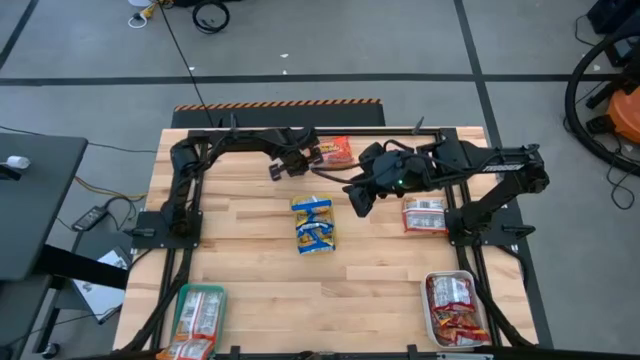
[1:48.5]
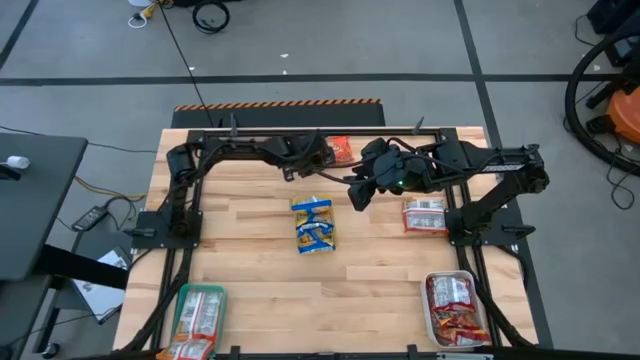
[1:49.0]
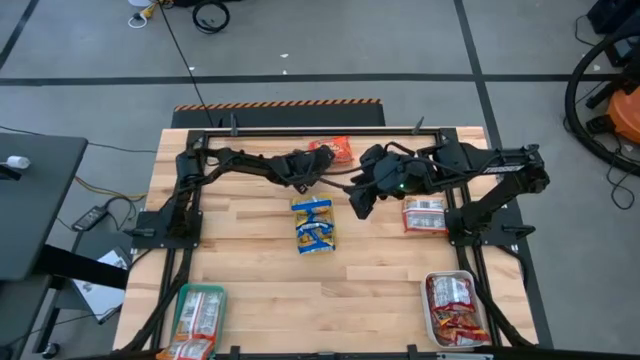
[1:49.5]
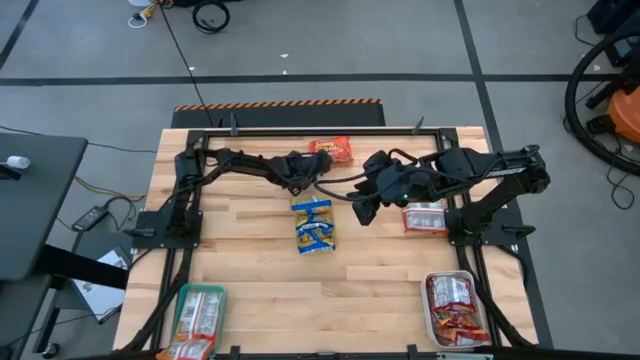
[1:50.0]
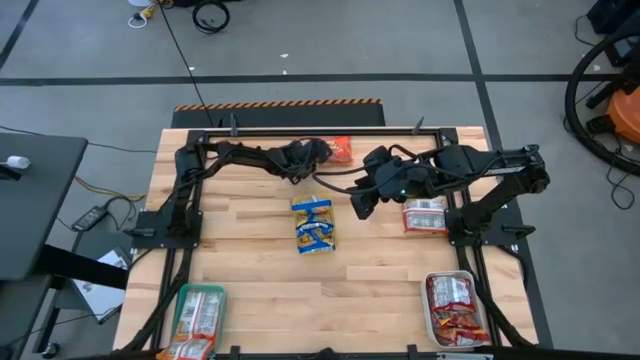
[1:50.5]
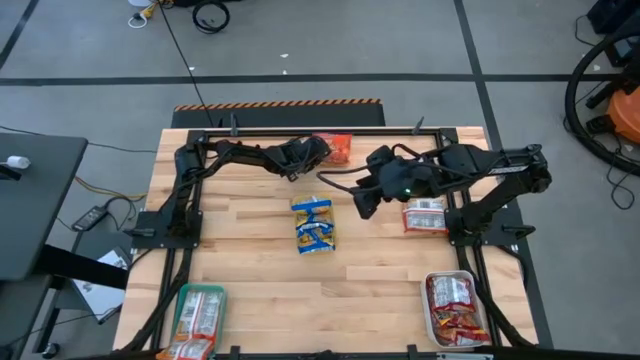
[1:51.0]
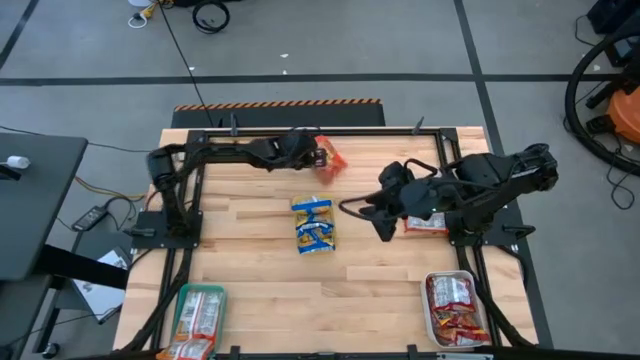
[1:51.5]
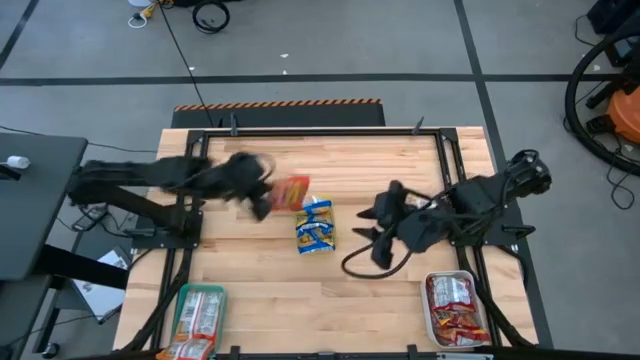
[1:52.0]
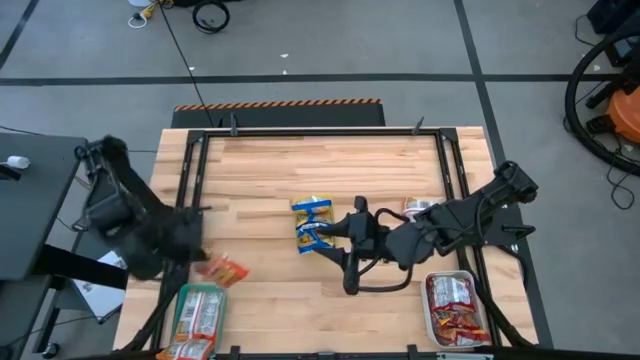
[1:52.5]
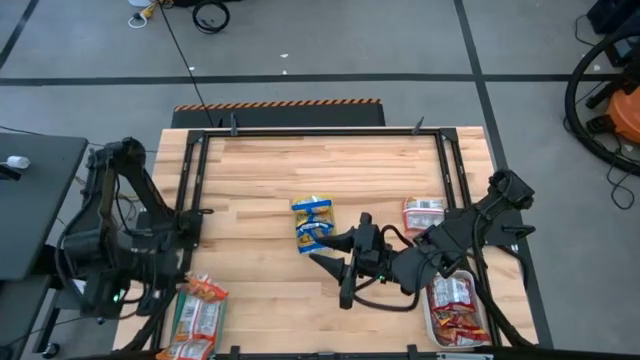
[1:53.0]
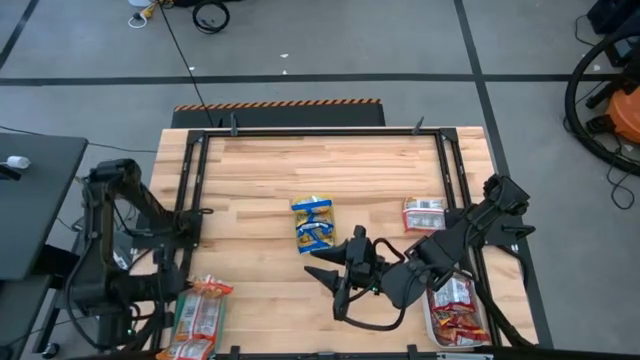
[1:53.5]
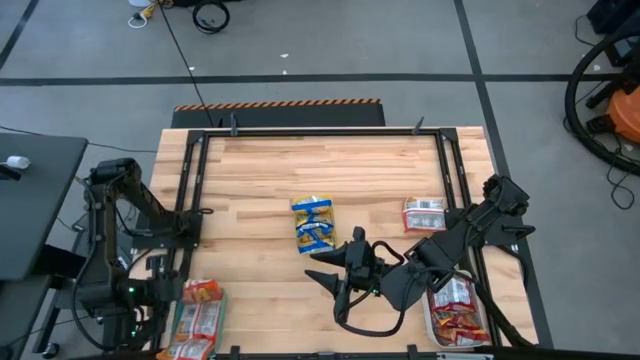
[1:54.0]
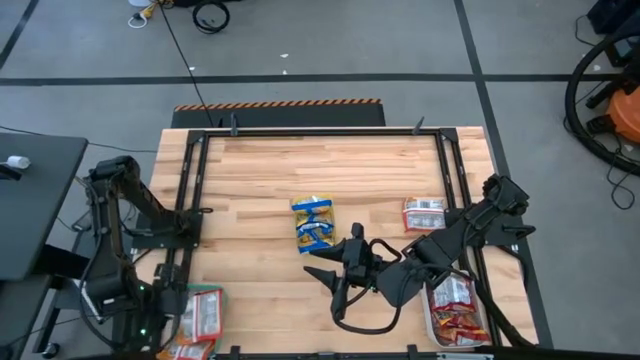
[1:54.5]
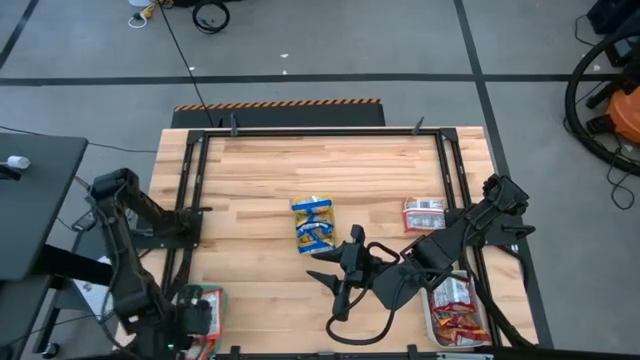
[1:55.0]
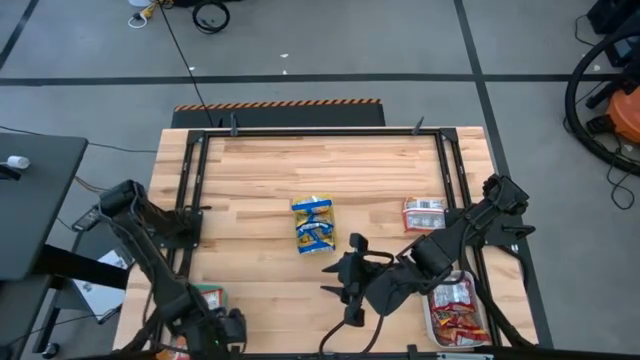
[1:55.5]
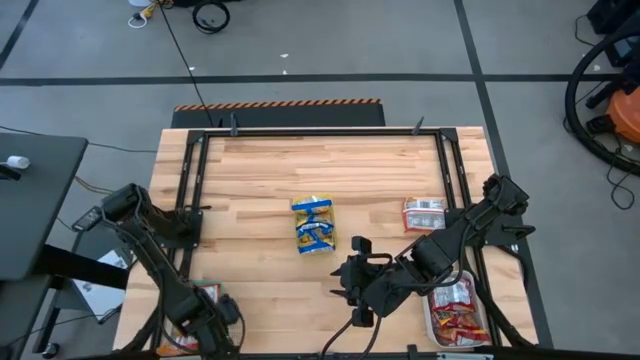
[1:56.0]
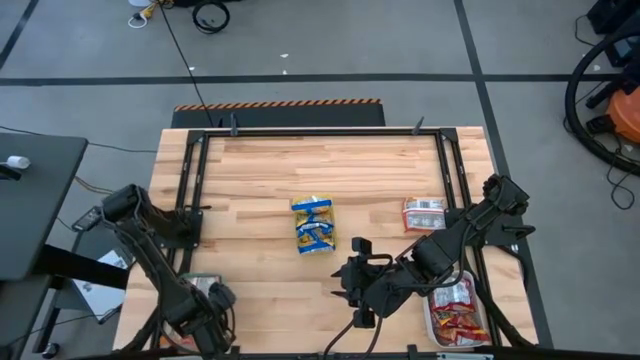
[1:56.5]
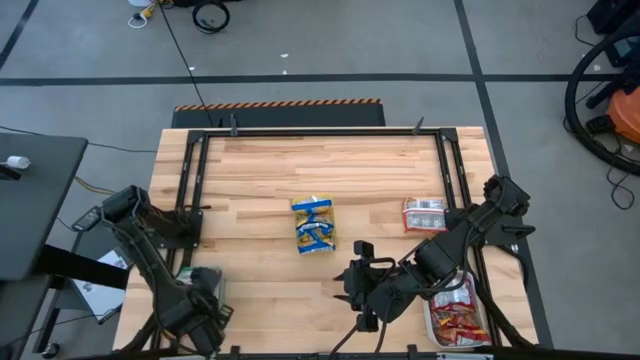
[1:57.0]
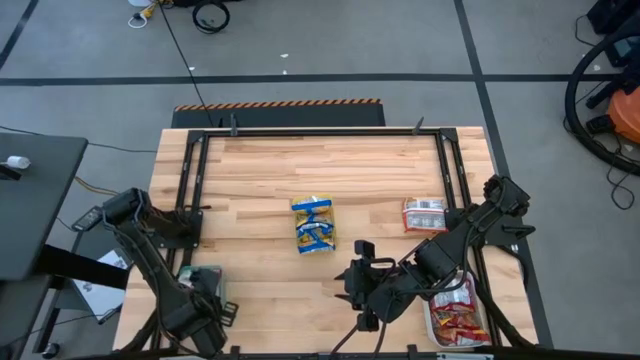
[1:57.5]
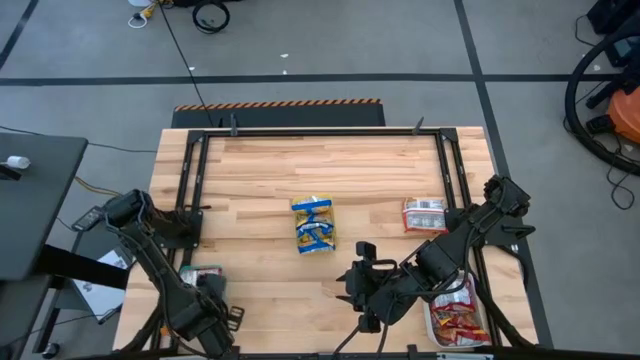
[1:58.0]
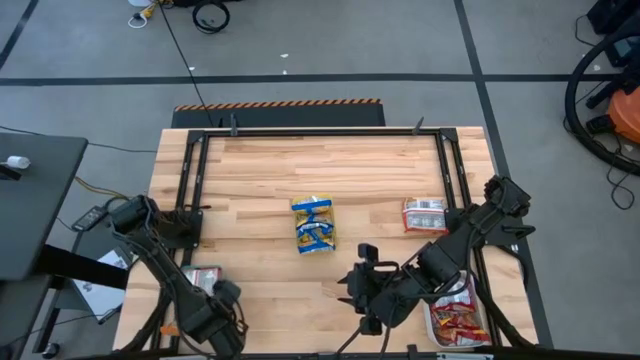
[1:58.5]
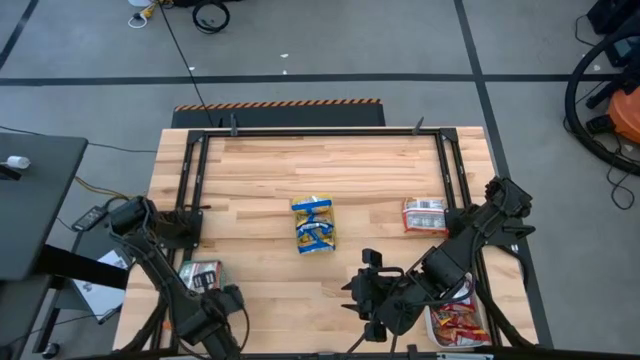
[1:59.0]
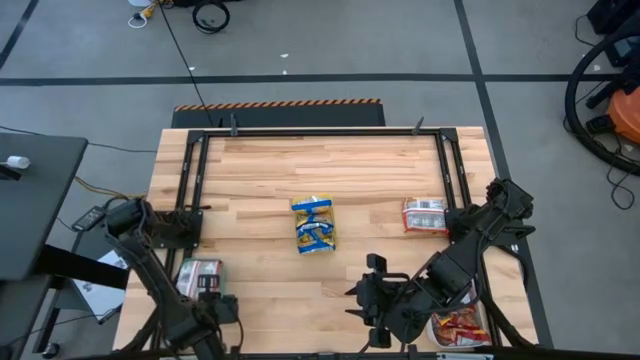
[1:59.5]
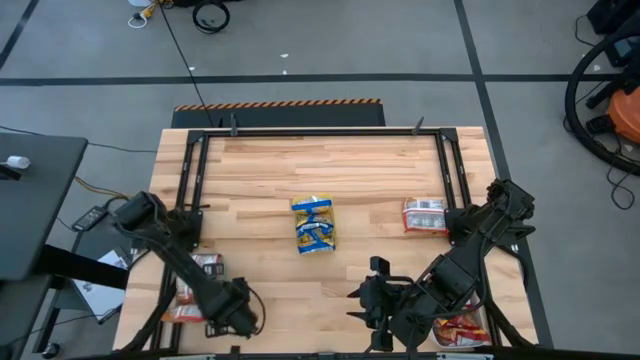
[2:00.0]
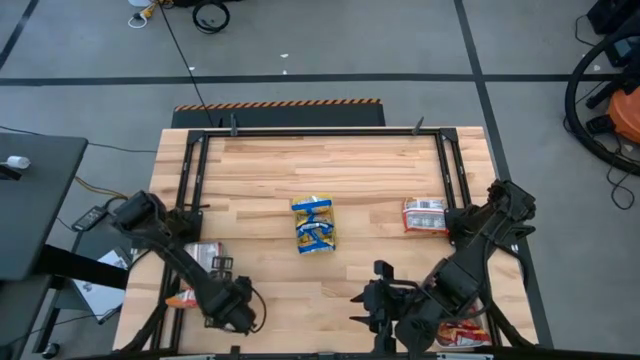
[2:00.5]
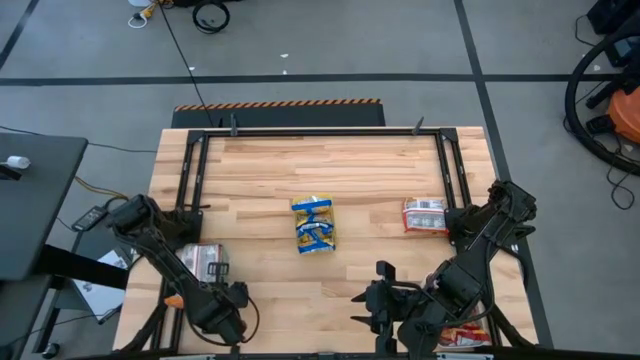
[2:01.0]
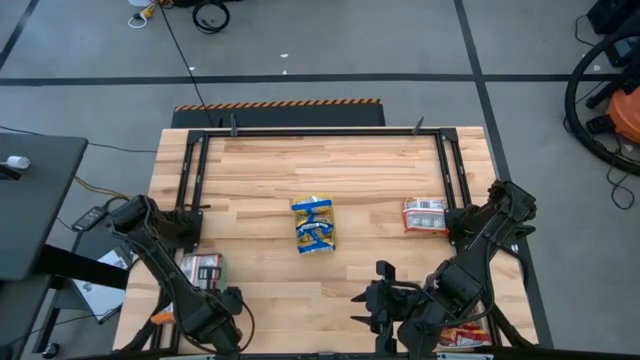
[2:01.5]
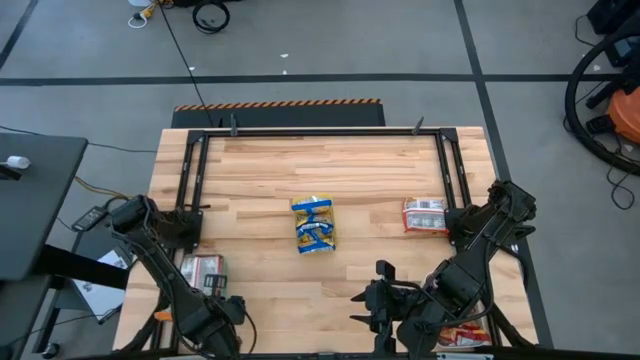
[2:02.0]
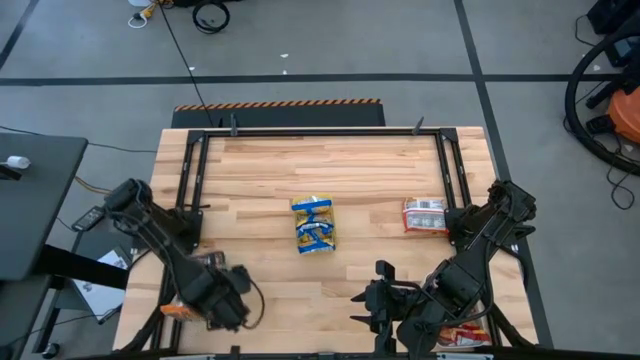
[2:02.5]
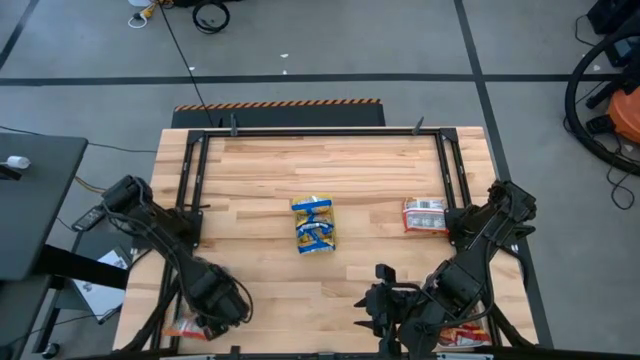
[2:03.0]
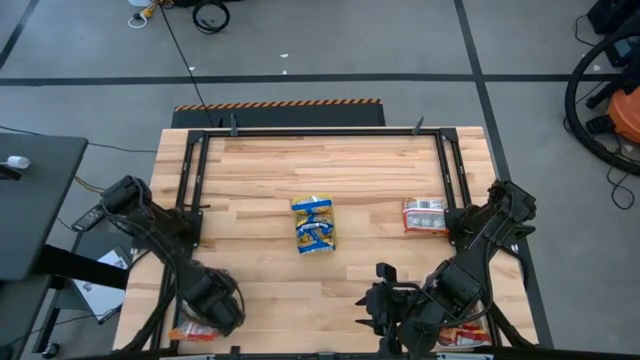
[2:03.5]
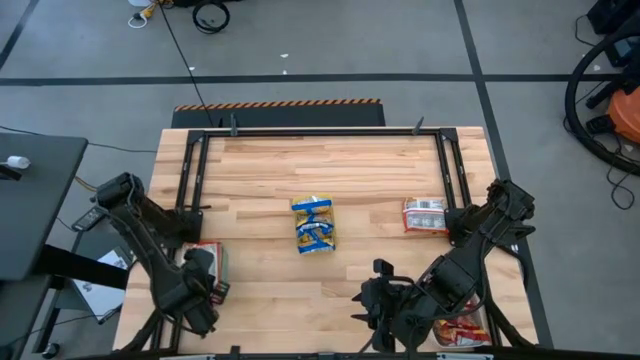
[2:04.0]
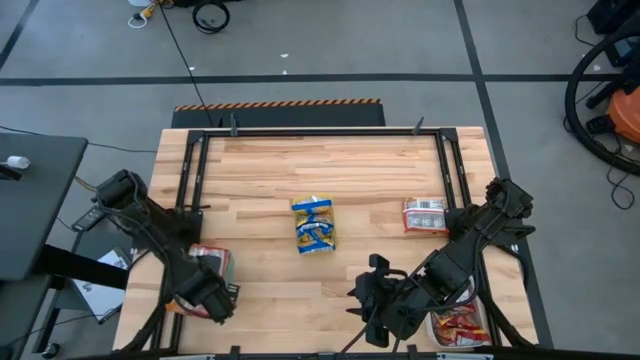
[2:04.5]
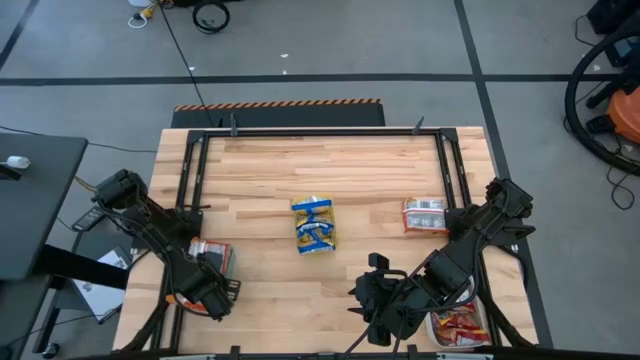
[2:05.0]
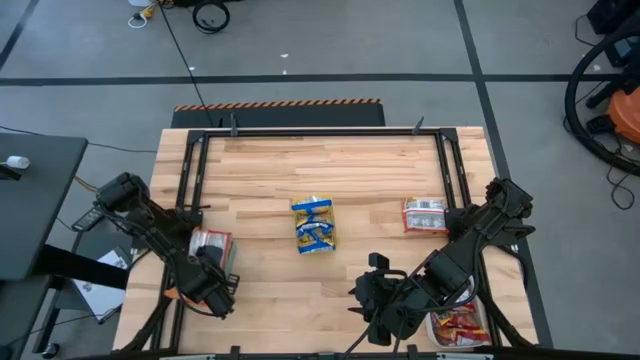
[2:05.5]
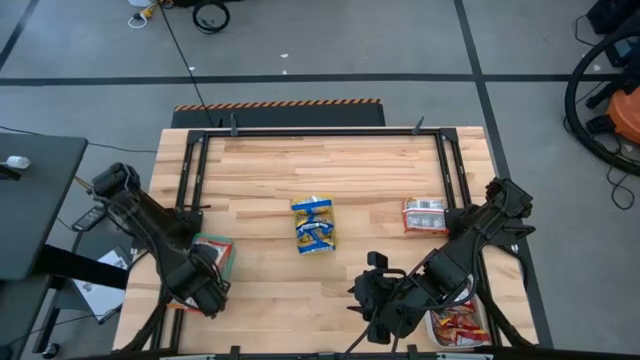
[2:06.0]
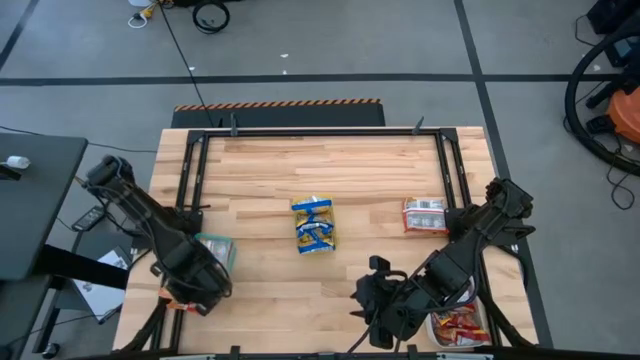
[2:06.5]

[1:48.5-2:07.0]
Task: Sort Maruchan noodles
Put the orange noodle pack into the green bin
